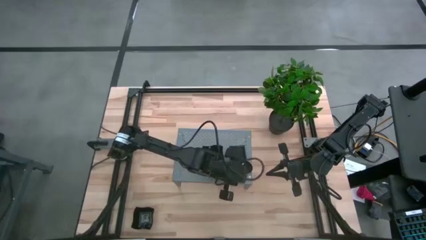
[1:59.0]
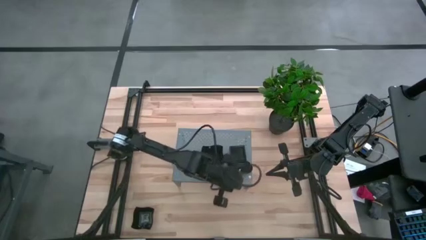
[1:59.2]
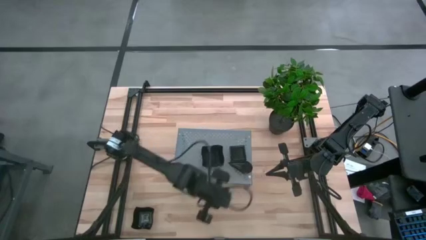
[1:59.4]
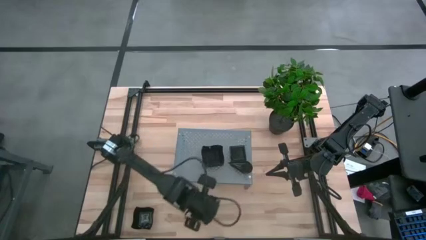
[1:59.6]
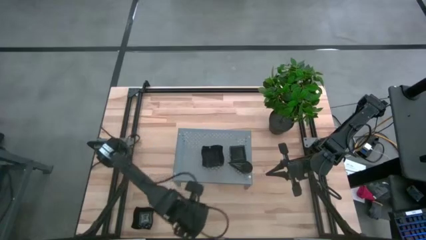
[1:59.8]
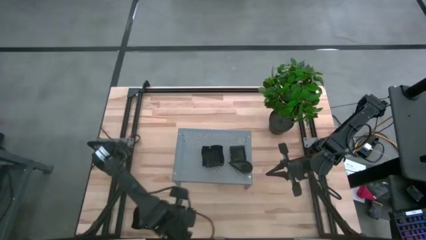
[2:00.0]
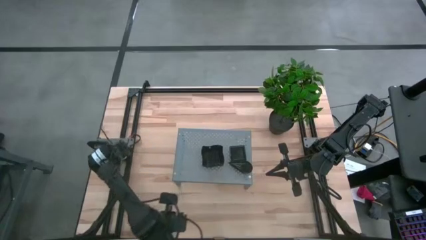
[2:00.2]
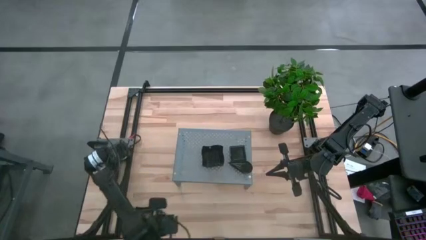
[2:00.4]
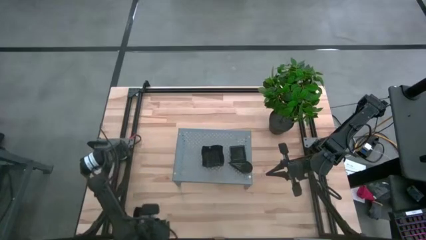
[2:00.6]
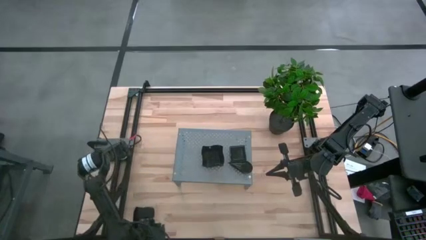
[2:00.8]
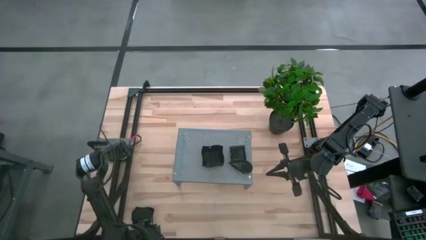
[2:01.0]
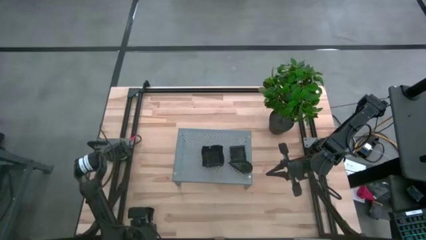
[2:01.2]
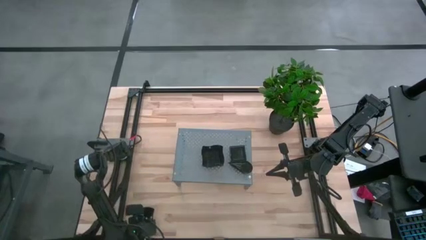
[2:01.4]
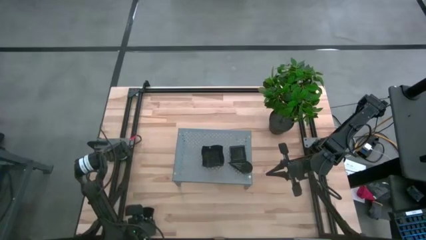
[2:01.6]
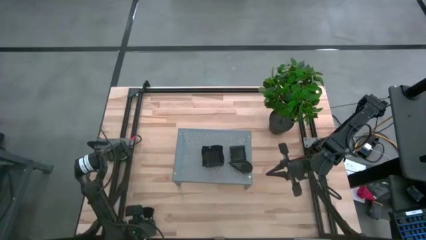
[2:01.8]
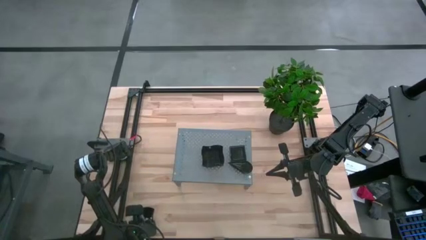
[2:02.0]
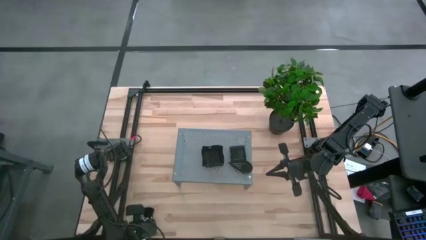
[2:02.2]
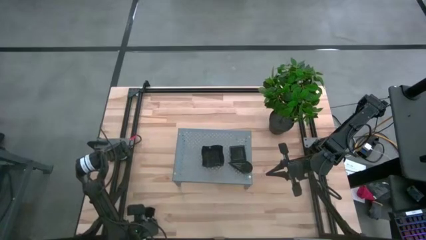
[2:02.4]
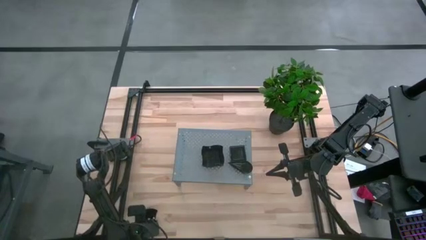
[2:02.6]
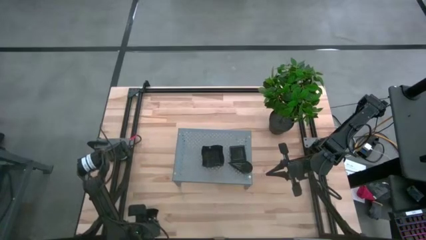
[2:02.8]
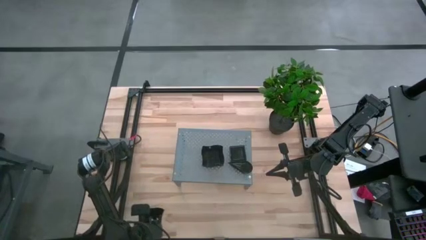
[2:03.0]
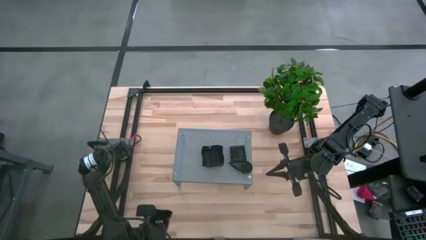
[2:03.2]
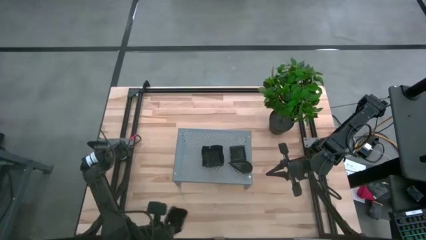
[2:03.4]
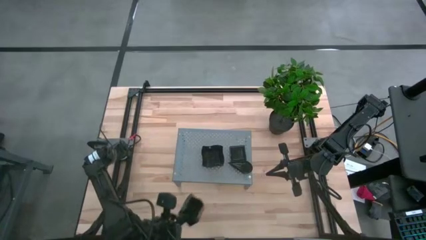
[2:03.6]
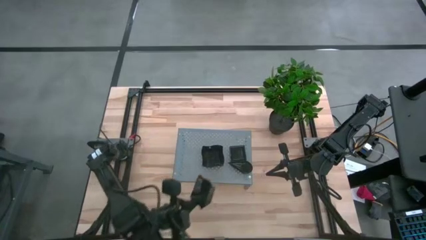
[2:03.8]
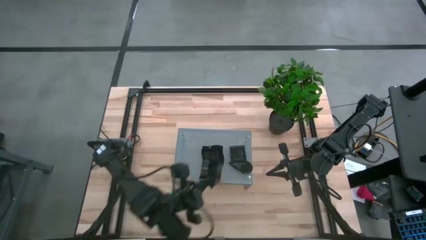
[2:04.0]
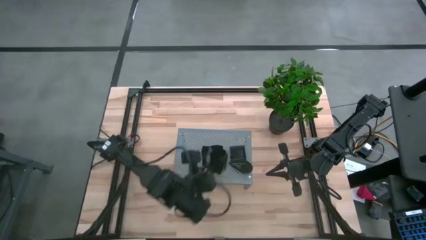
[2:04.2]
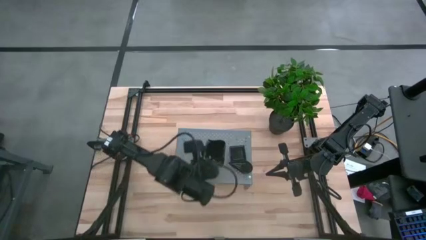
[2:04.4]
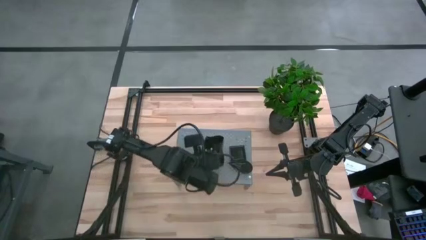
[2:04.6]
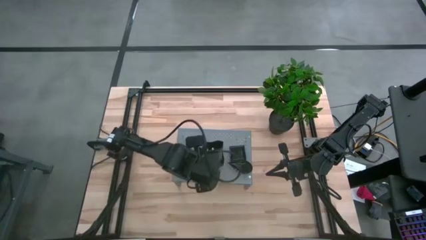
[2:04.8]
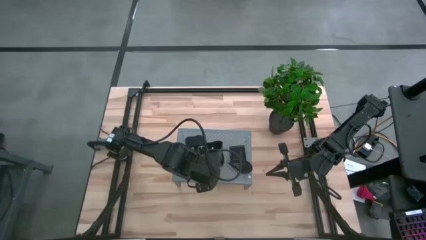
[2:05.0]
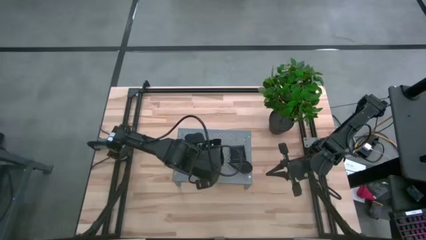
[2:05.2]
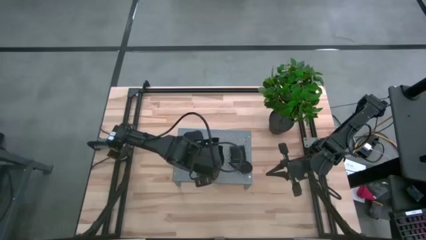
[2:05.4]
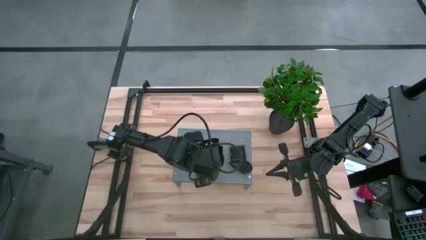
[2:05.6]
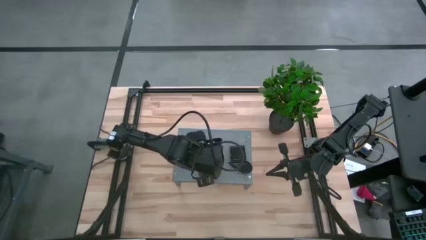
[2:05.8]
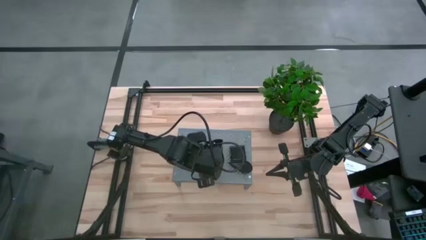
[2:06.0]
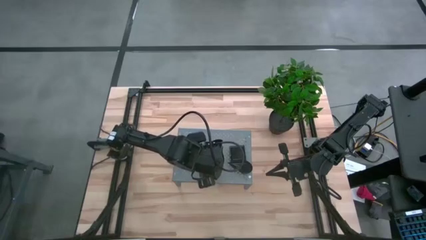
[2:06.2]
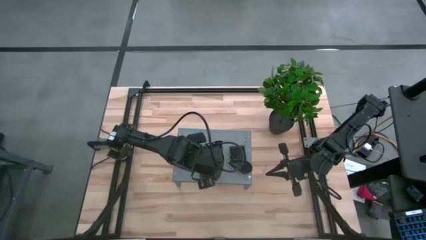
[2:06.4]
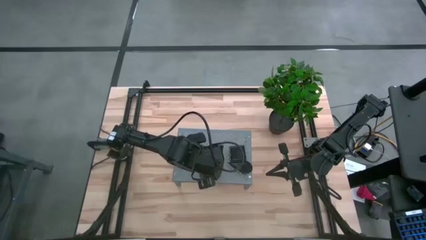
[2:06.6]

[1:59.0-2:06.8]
Task: Pick & Place Mini shaped plates
Stack the black distorted plate on the distorted plates on the shelf

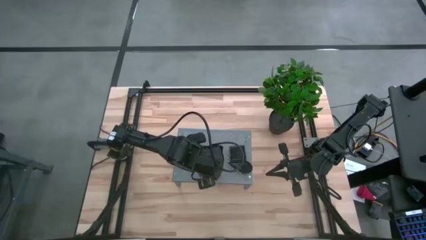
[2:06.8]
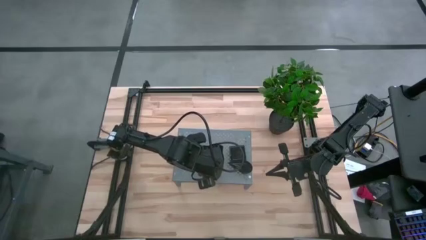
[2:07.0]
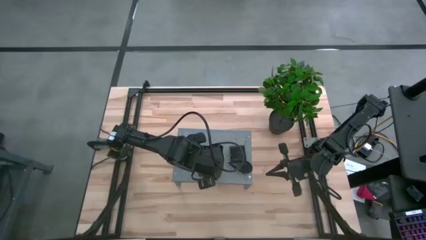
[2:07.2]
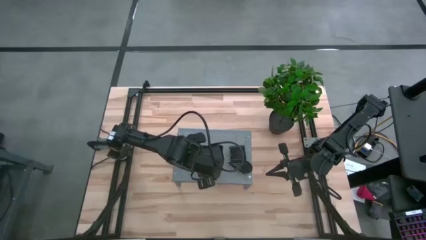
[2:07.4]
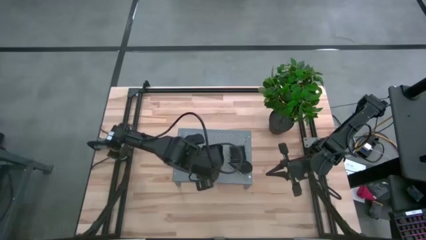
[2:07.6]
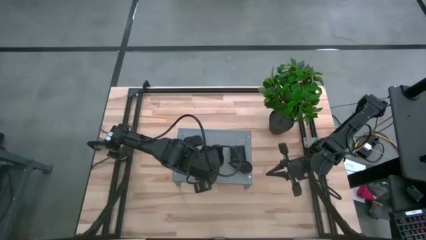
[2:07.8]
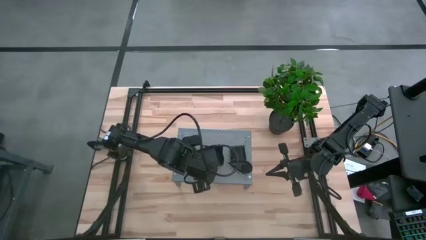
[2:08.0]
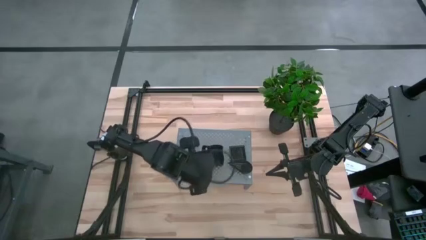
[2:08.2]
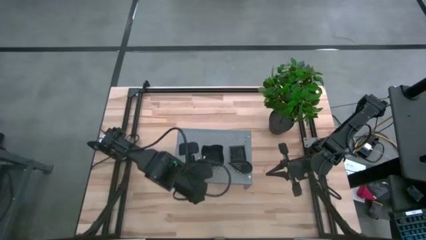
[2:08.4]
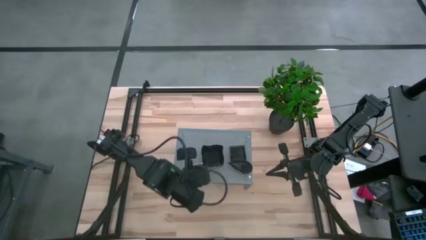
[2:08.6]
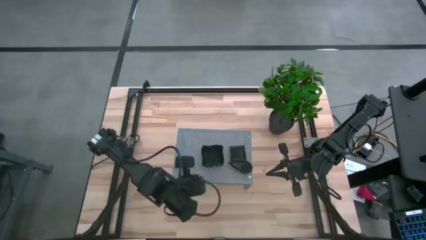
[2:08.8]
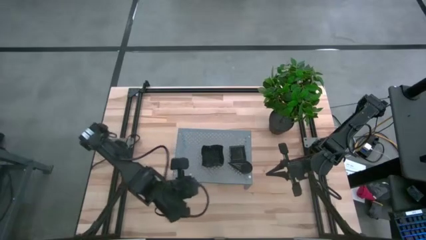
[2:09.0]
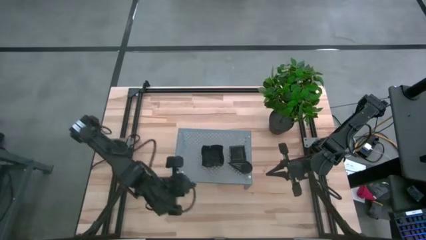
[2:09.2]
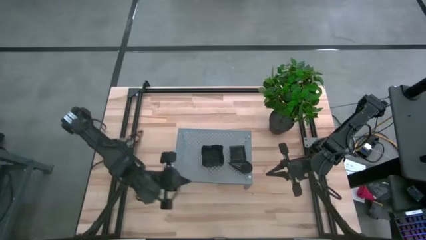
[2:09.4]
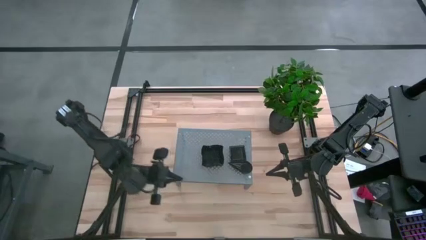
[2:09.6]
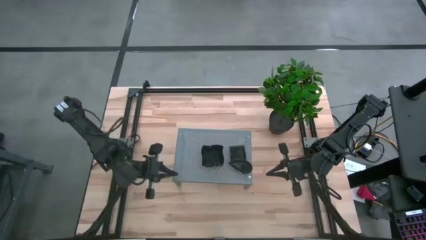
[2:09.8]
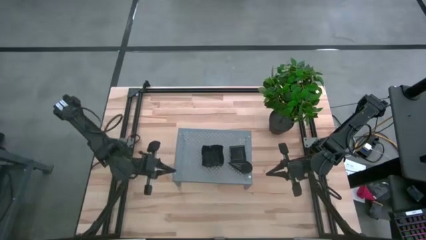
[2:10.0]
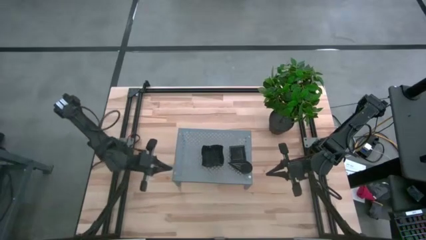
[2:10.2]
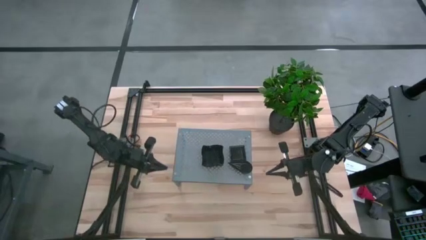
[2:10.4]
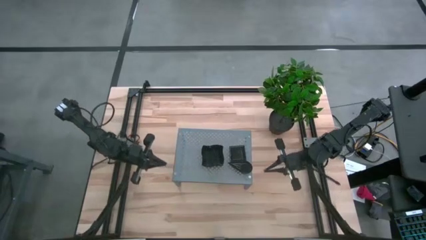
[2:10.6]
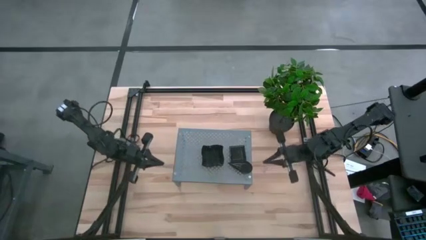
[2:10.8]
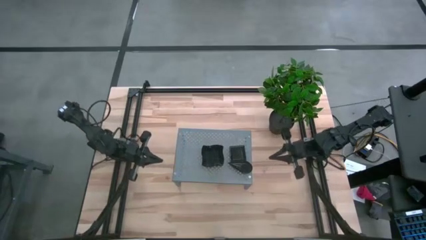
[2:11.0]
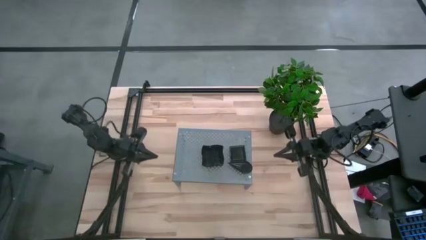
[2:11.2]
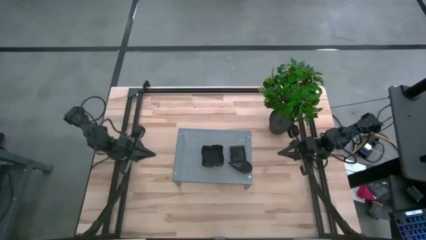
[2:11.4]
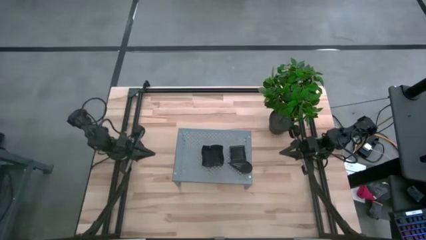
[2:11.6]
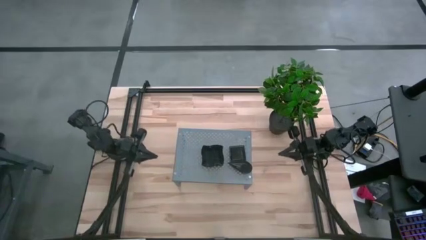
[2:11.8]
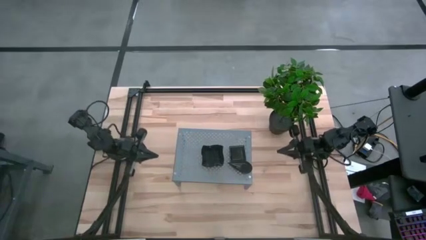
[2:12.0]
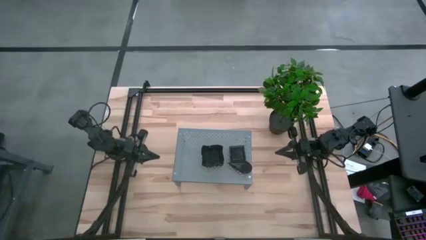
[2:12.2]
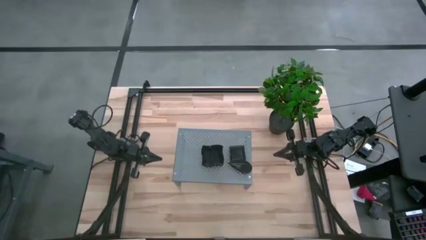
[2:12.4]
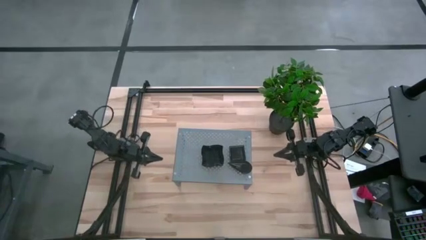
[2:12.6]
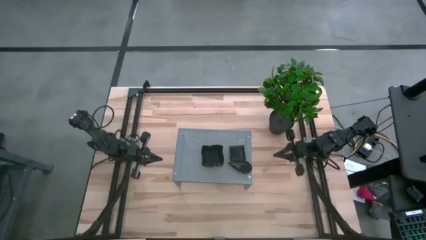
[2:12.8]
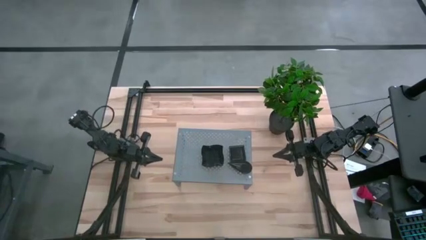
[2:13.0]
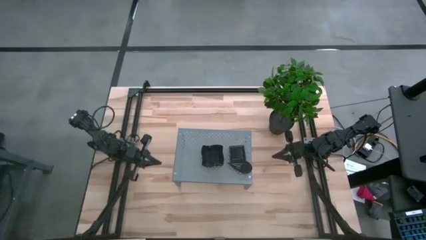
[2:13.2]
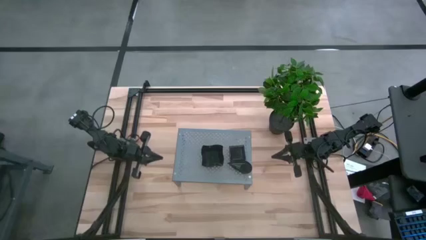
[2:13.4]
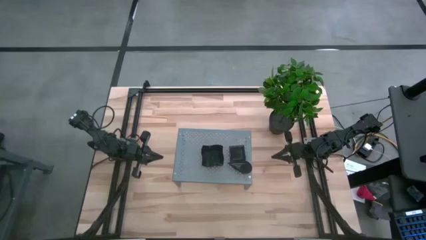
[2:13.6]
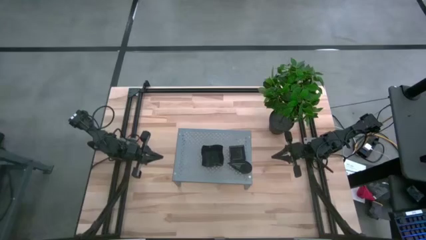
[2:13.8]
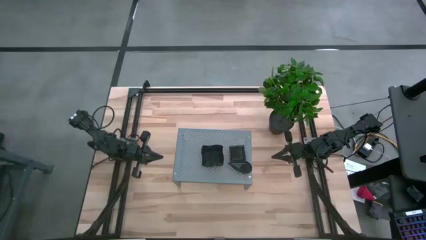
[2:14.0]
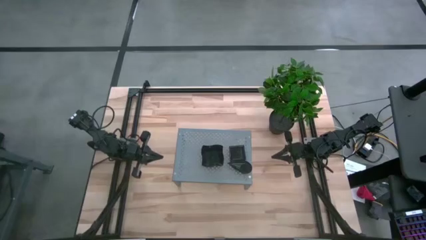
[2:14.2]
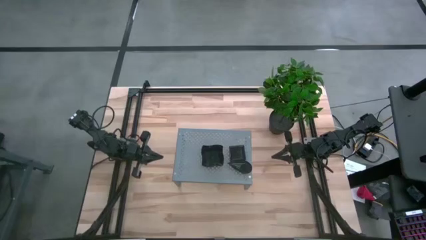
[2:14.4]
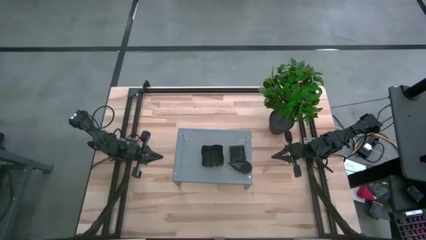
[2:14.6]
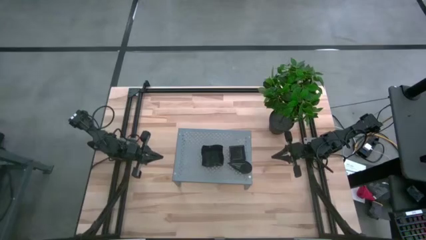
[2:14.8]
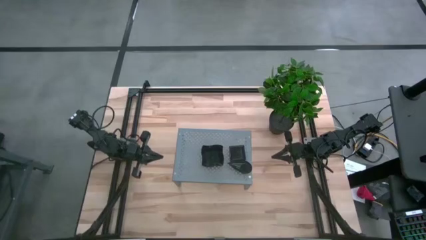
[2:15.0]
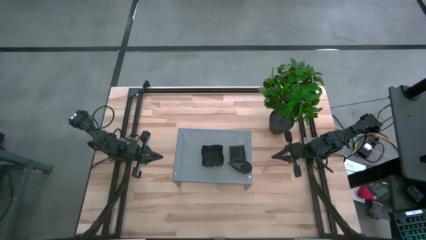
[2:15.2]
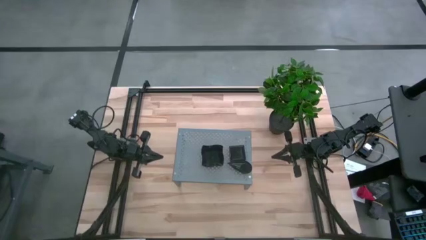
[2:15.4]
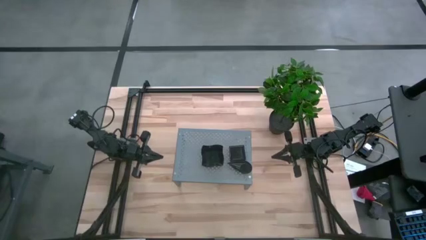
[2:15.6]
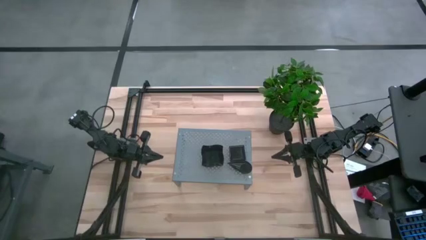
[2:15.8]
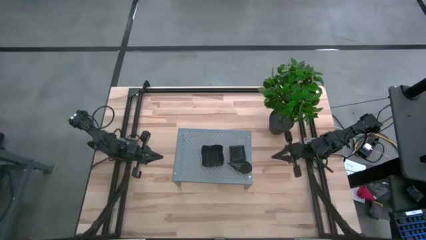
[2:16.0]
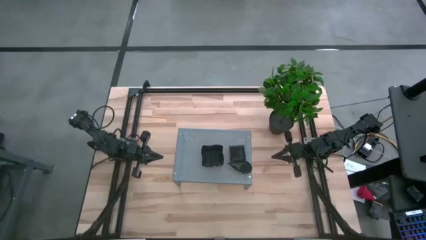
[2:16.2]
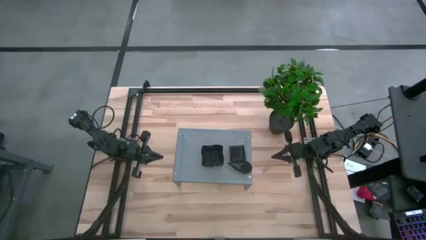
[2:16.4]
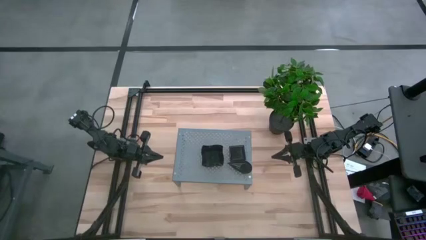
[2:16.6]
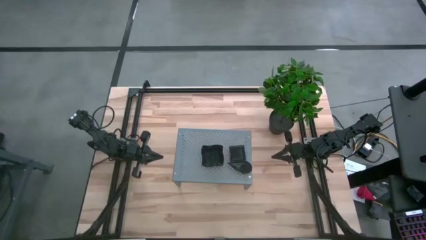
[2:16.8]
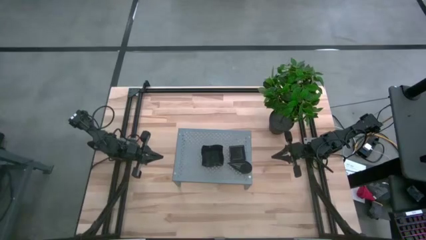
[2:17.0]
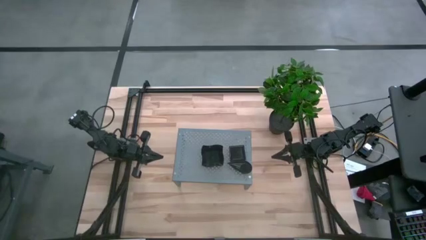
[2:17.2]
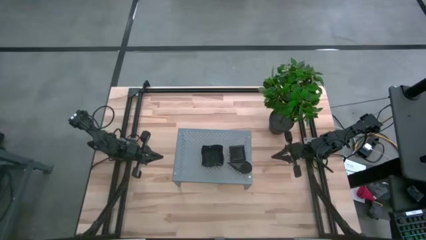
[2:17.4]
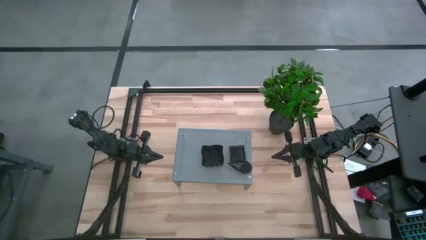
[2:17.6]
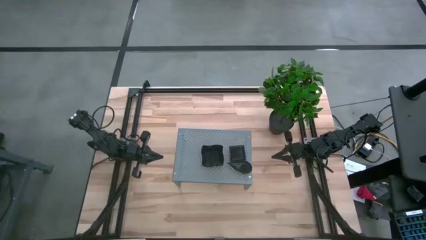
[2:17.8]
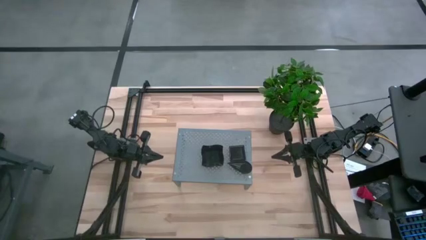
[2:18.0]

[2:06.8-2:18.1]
Return to home position
